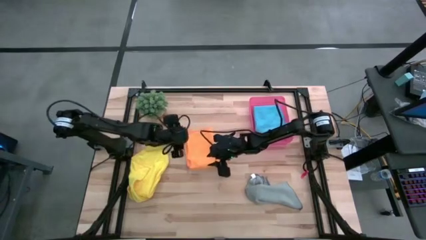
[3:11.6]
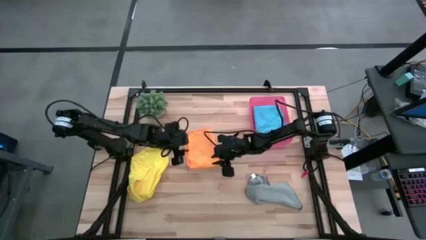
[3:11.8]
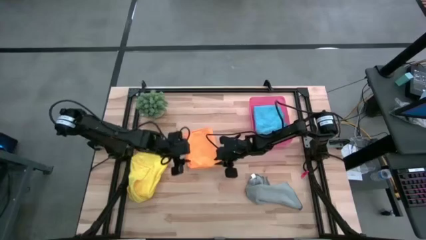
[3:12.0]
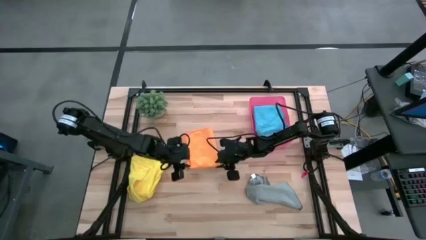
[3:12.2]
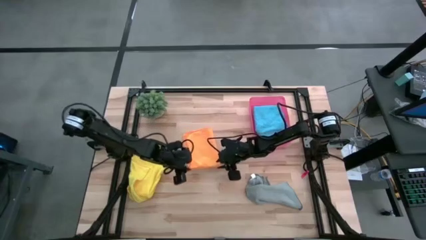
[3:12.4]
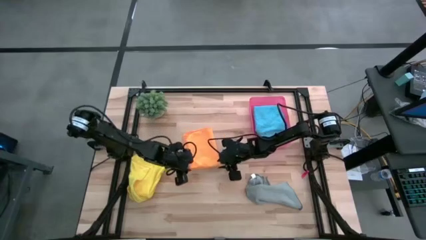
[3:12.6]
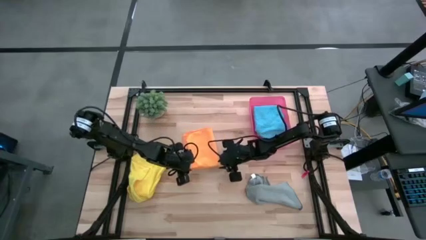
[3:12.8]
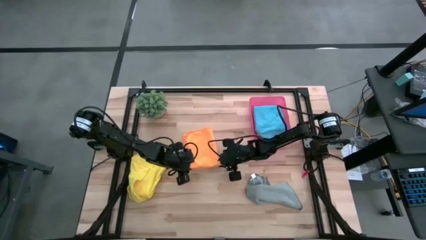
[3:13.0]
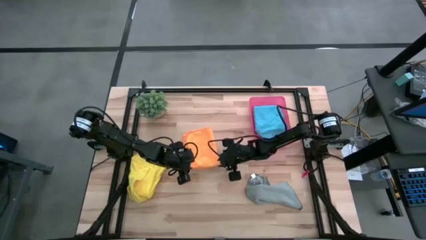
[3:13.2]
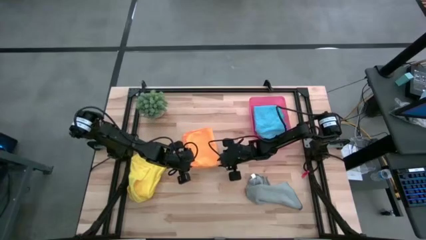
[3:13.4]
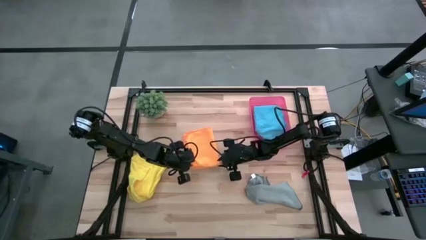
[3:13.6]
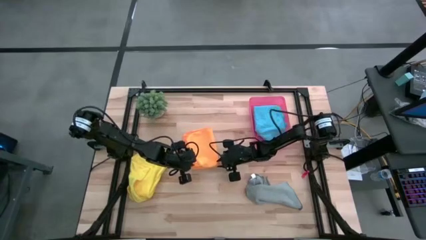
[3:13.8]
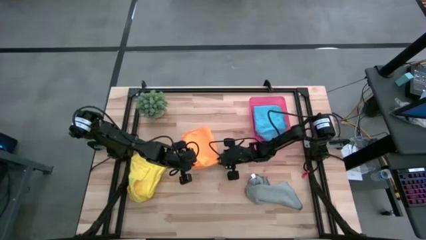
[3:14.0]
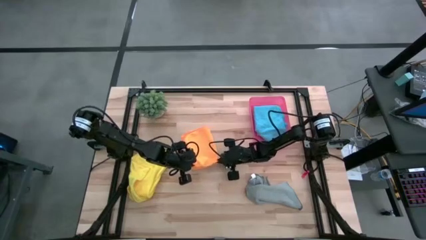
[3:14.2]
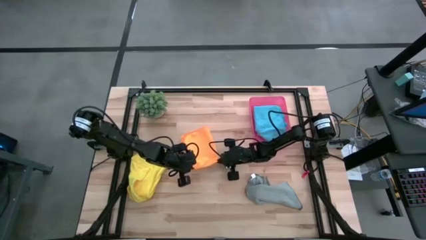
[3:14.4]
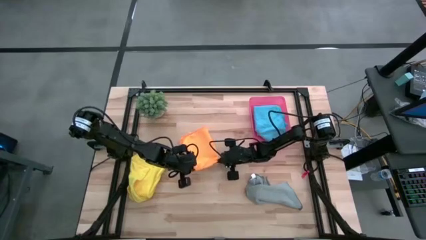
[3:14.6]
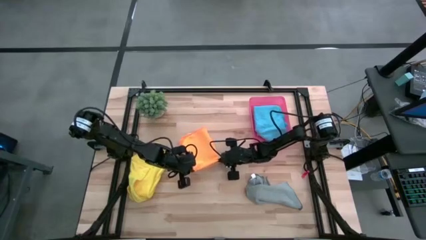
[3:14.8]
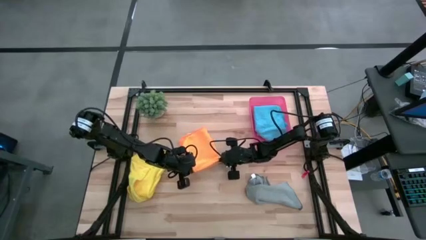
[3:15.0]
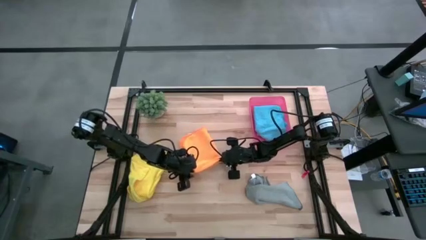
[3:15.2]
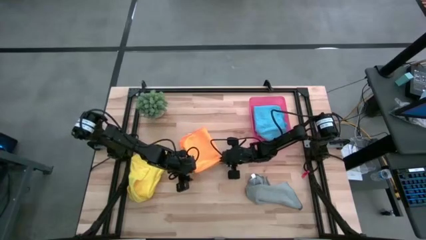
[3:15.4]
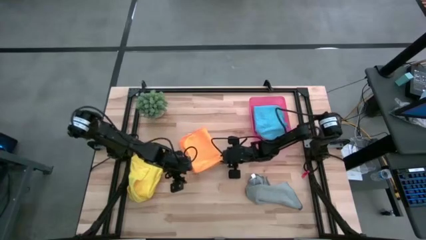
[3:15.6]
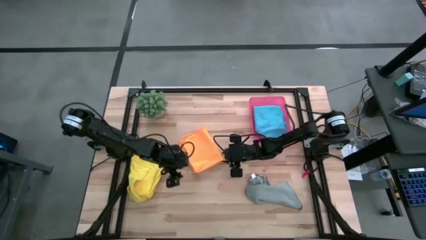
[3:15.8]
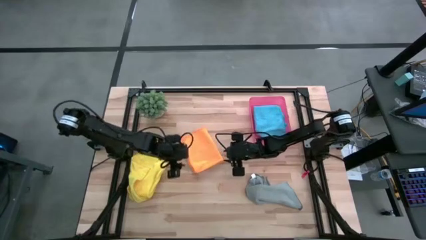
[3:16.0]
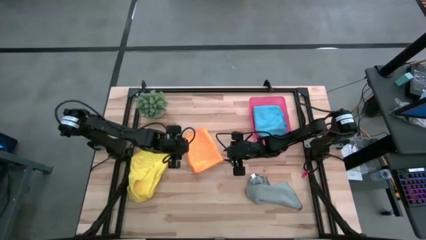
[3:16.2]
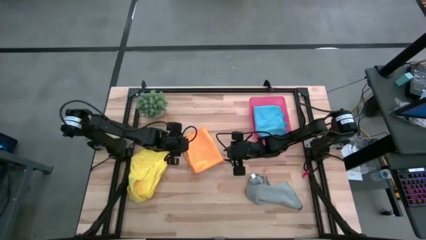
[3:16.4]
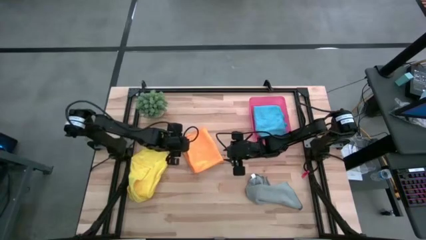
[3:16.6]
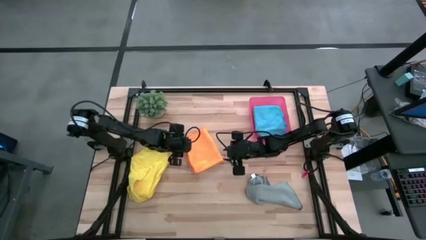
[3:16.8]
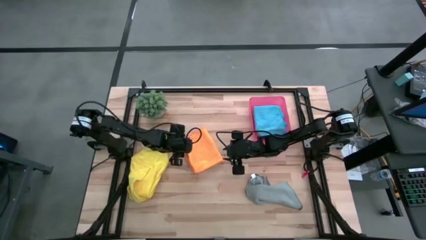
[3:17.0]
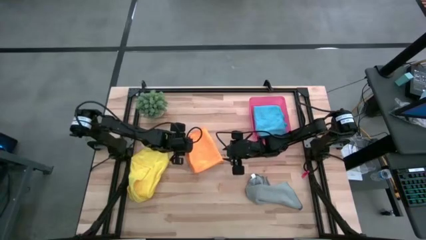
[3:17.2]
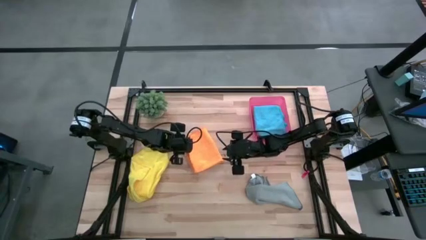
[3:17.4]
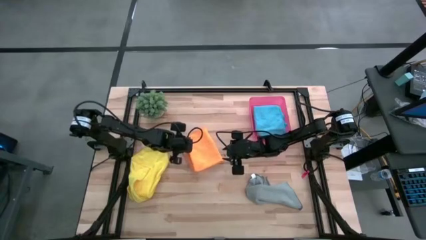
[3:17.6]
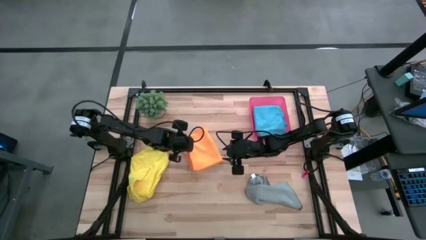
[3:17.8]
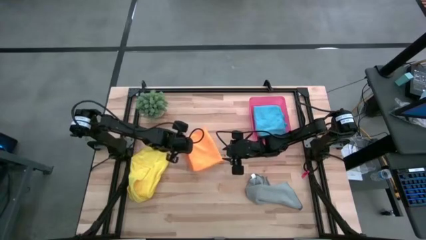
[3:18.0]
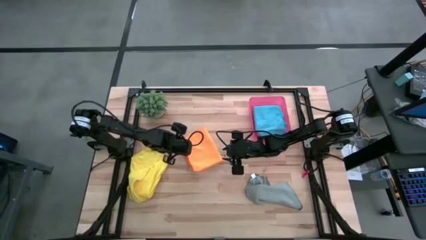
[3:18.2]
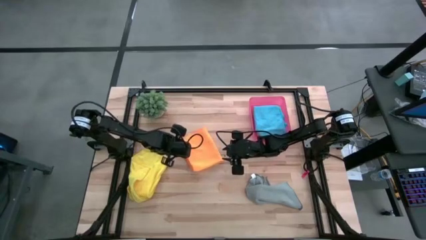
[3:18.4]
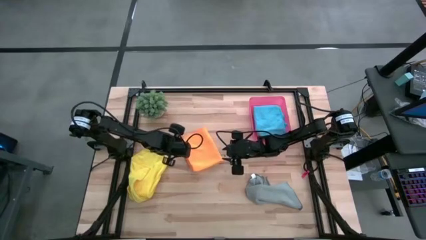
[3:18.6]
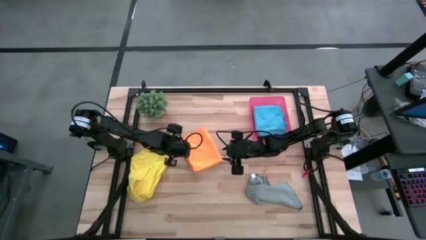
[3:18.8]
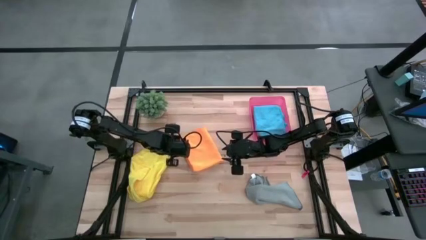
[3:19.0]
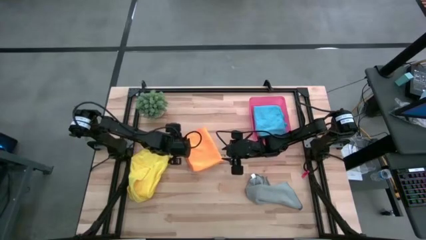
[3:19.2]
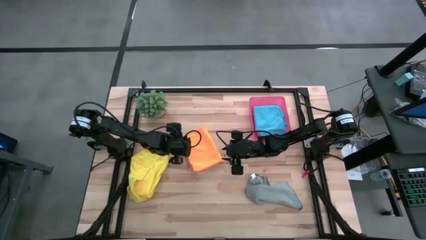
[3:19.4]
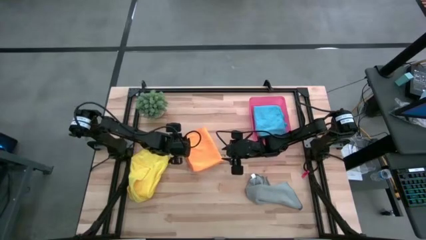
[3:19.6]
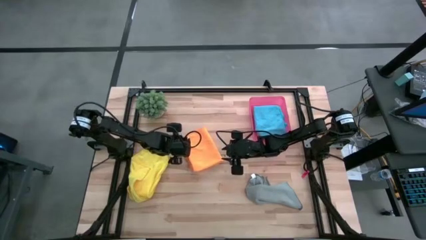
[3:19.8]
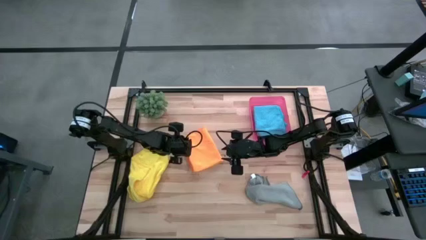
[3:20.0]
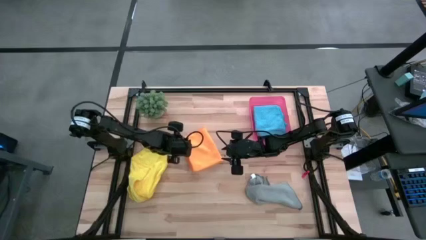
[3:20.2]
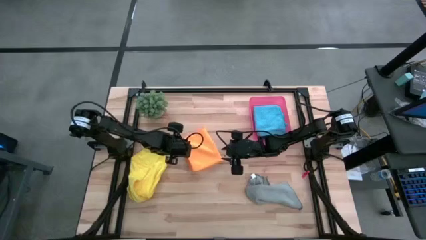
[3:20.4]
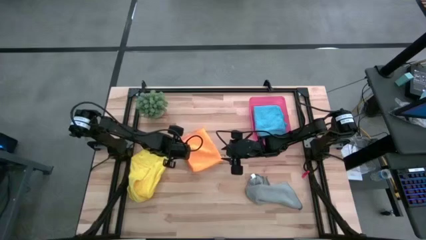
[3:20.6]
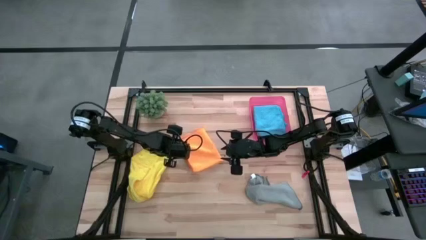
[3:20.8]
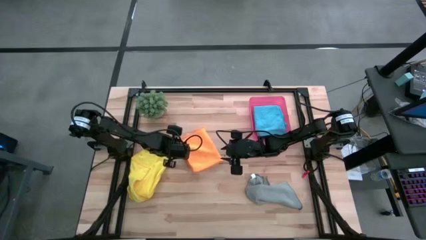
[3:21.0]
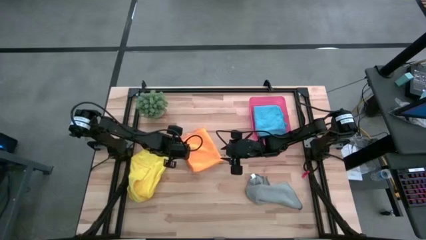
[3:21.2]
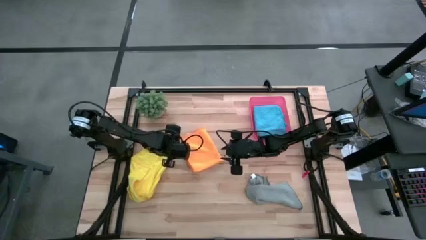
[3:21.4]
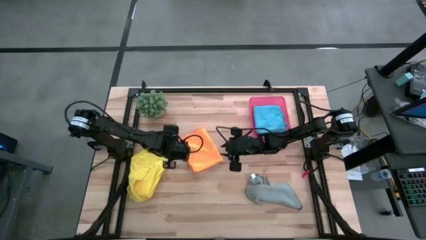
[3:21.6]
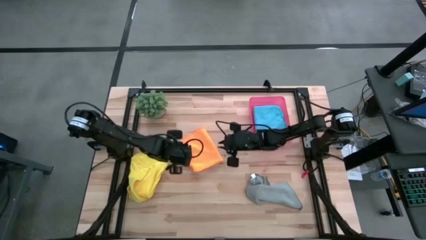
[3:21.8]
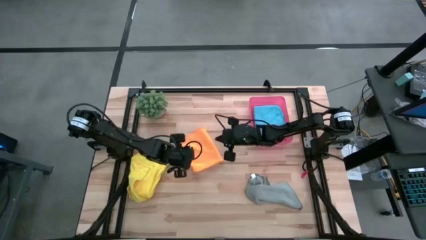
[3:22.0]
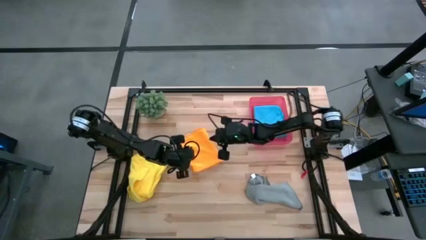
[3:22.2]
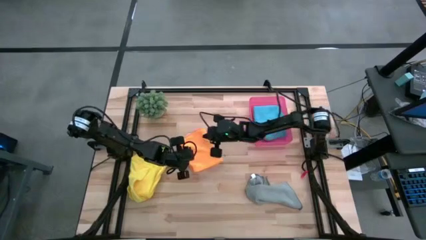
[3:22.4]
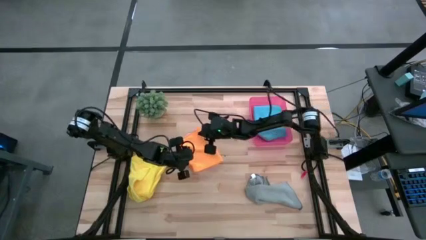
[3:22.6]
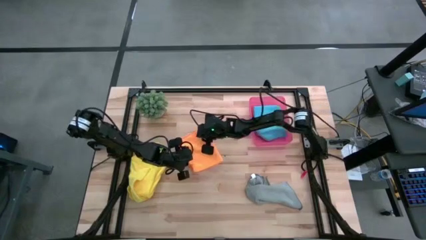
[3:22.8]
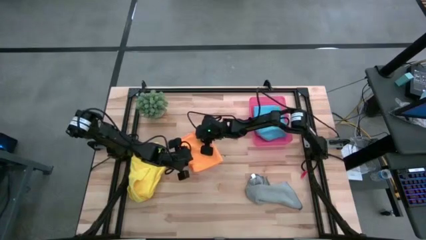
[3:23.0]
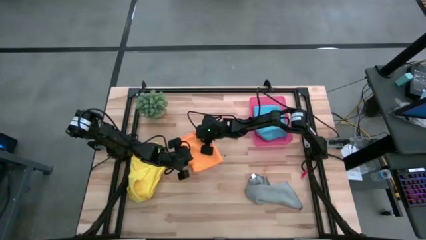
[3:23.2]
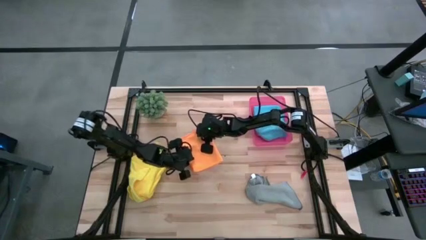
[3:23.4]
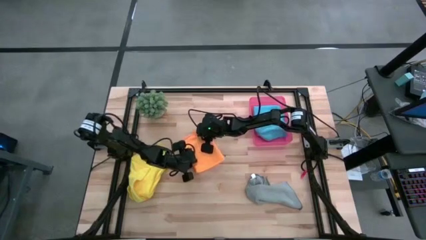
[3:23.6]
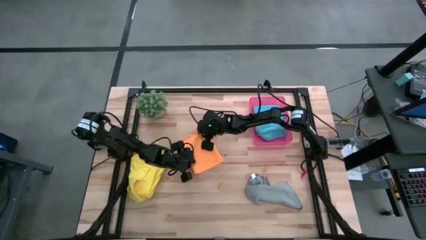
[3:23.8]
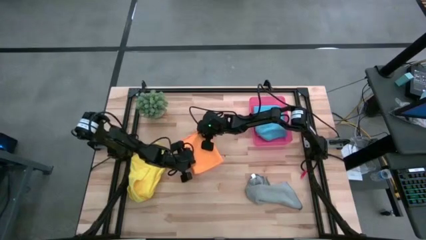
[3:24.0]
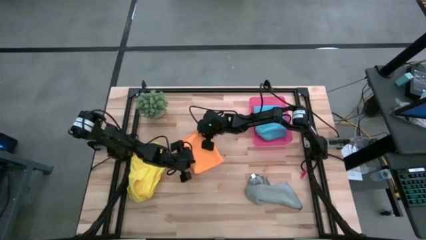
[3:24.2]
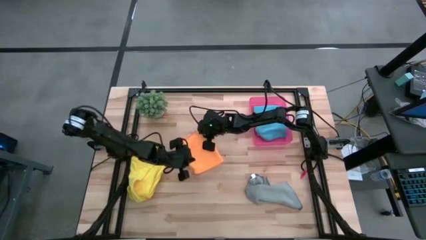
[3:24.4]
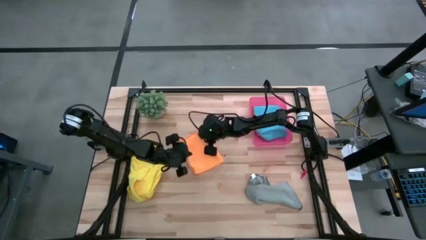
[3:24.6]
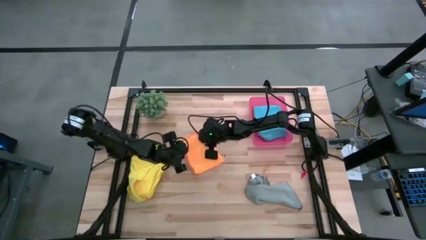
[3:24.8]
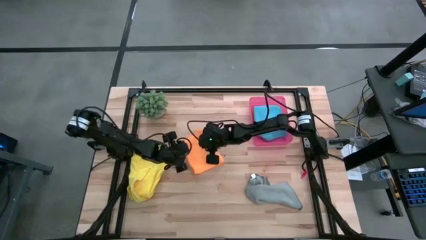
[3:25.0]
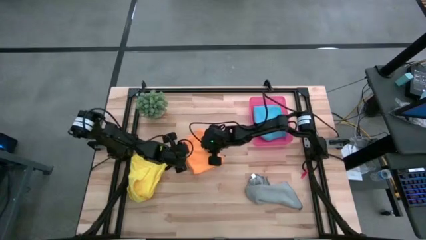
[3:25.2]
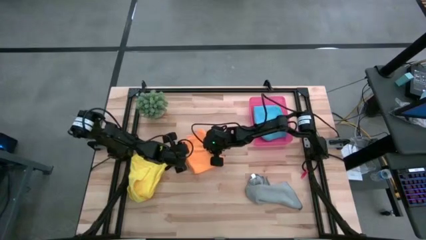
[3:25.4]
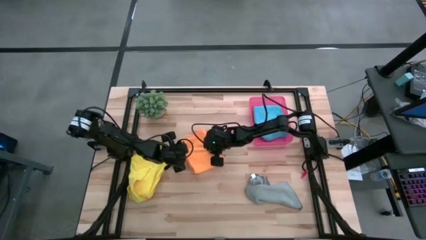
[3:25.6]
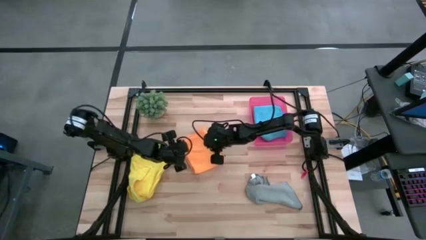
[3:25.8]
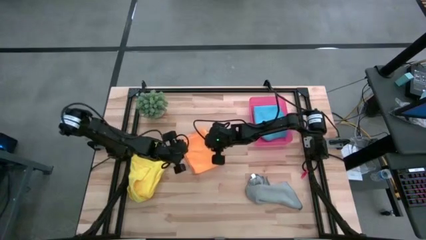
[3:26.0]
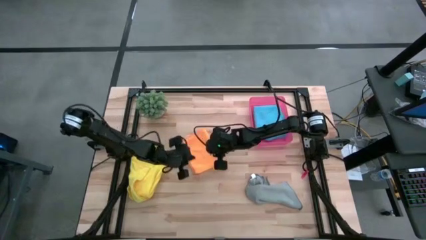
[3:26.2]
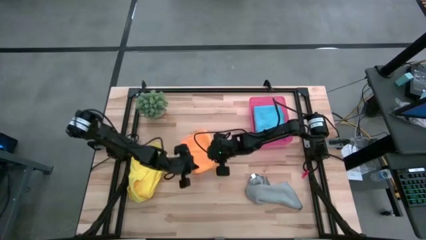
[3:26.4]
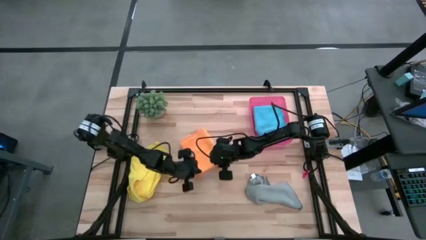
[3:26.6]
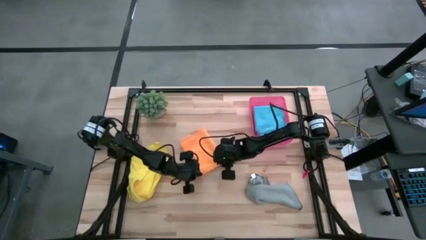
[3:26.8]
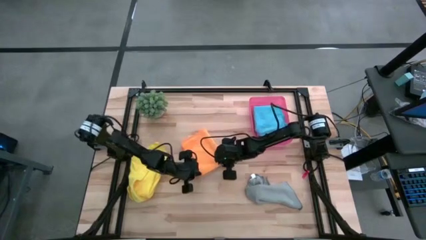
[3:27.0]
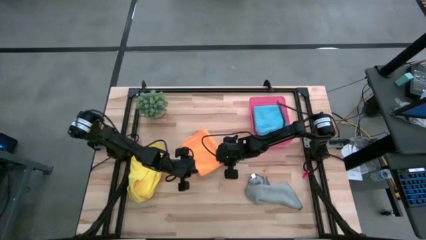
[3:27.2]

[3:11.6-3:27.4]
Task: Fold microfiber towels
Fold the orange microfiber cloth
